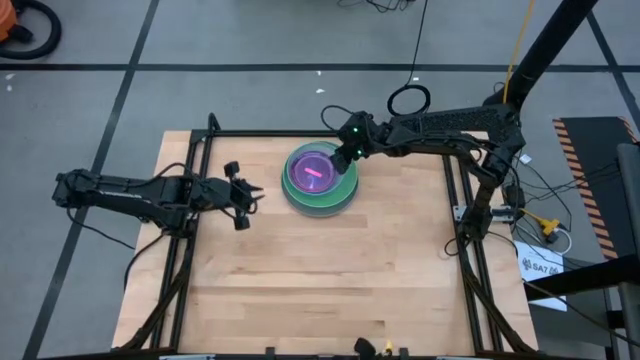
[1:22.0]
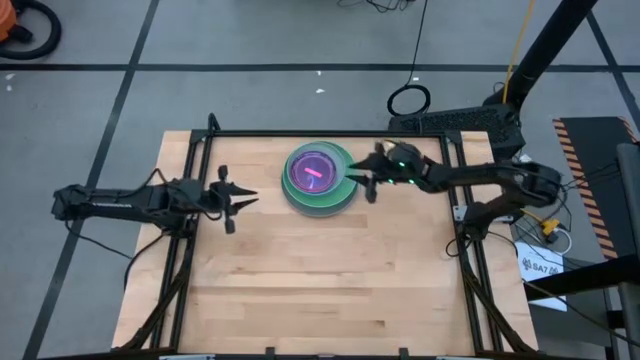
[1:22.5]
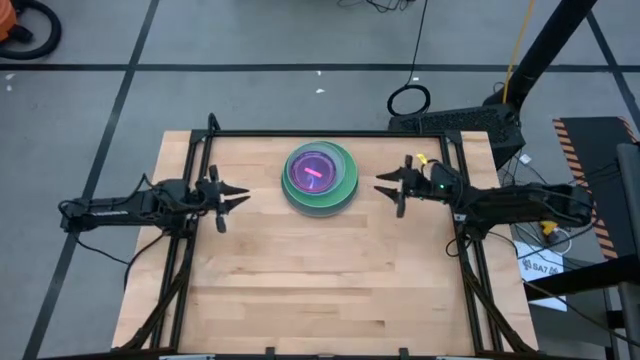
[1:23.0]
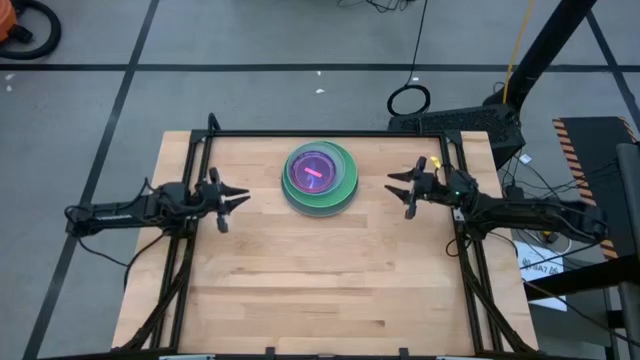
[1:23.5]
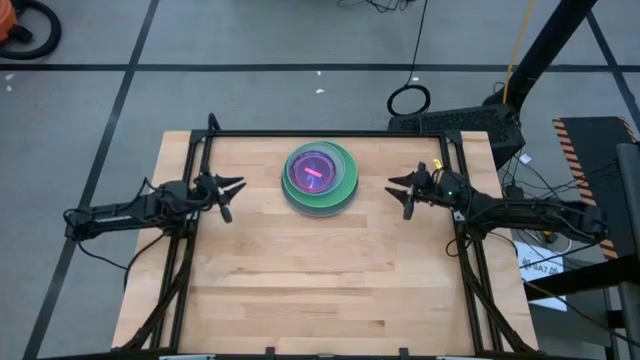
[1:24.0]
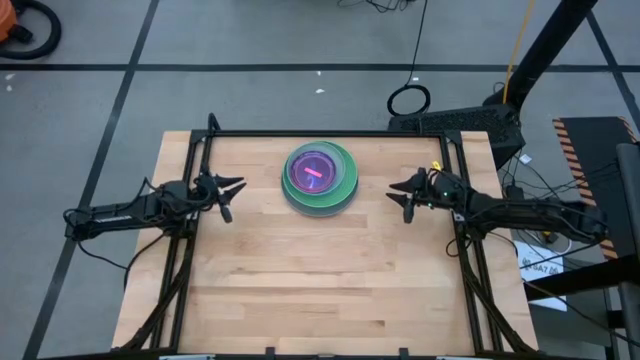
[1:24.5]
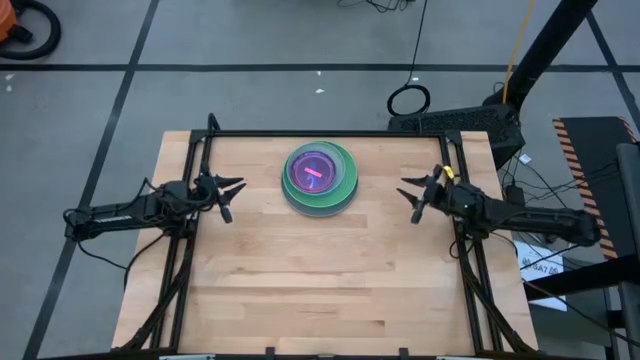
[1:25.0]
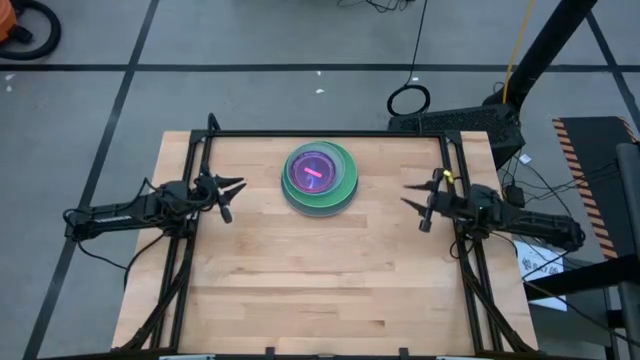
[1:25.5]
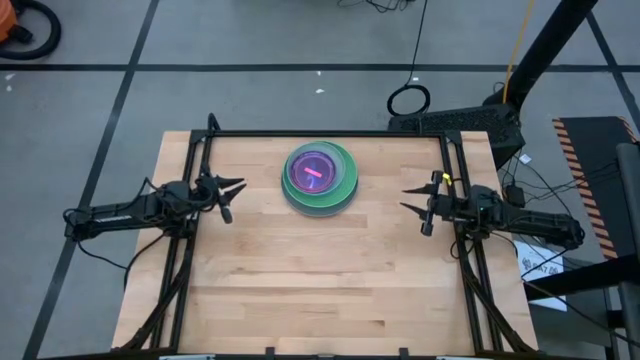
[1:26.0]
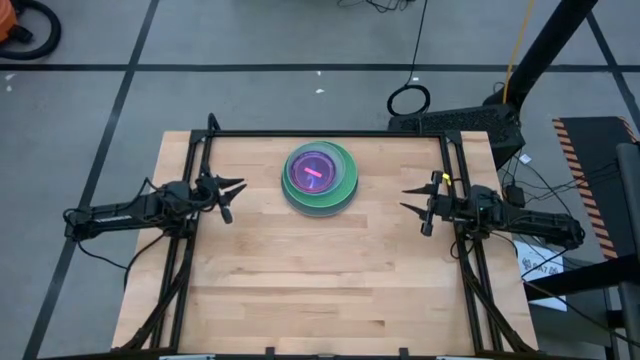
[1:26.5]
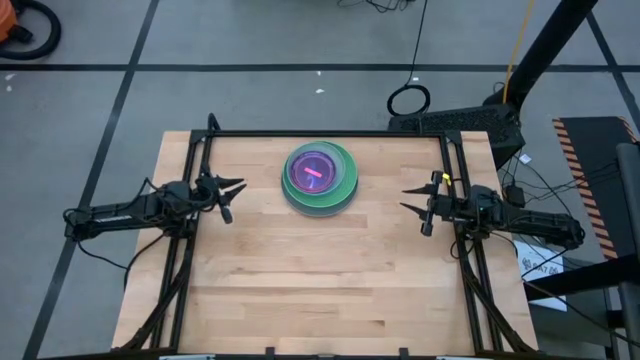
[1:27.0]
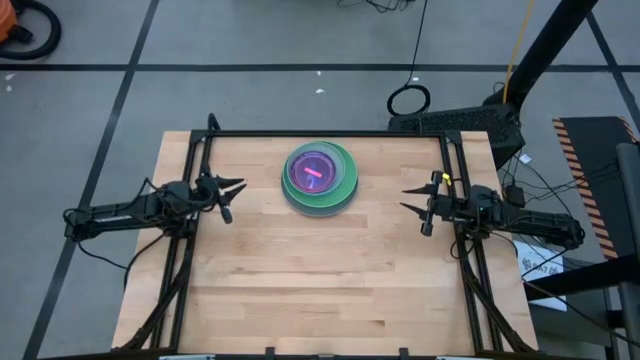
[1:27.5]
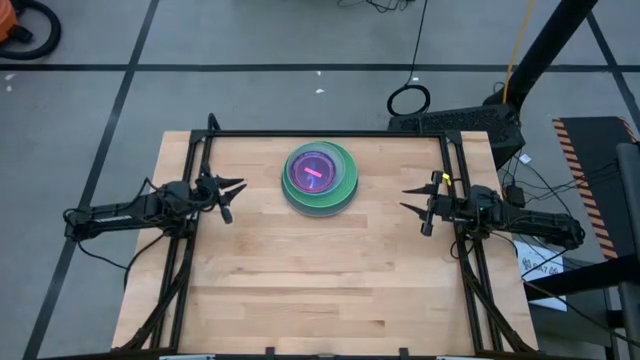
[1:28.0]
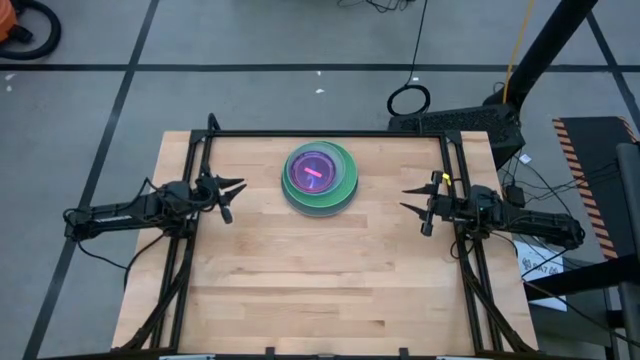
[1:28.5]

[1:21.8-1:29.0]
Task: Stack plastic plates
Return to Home Position

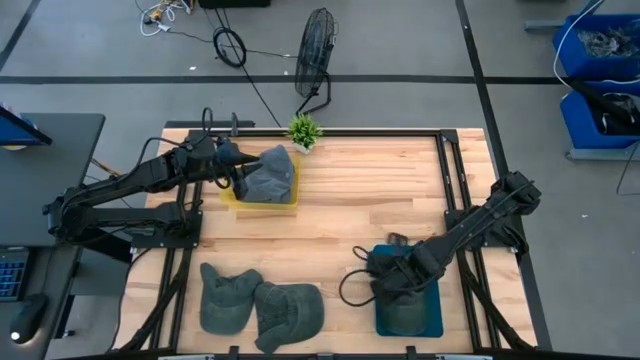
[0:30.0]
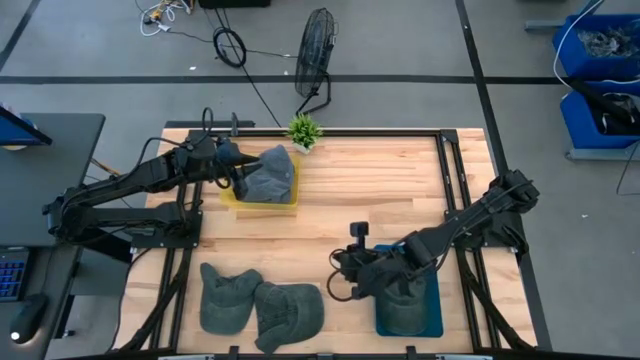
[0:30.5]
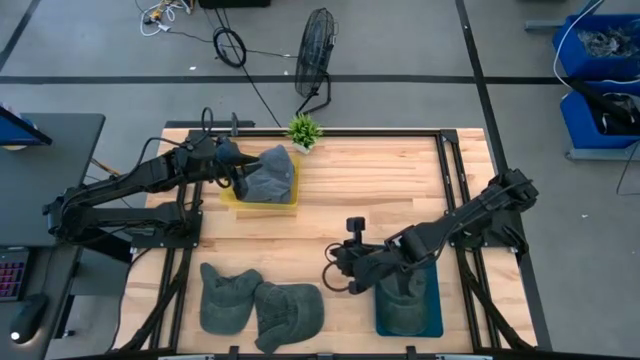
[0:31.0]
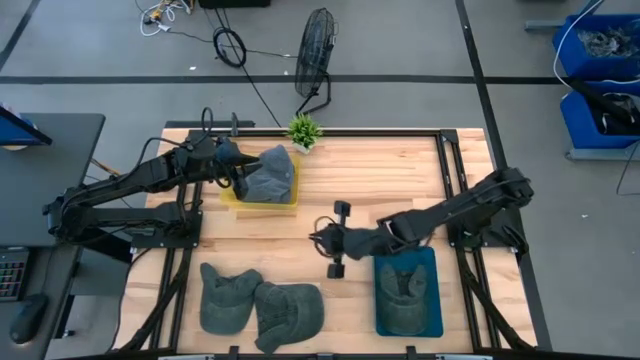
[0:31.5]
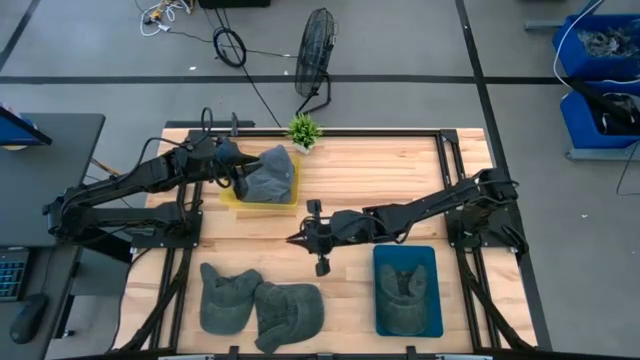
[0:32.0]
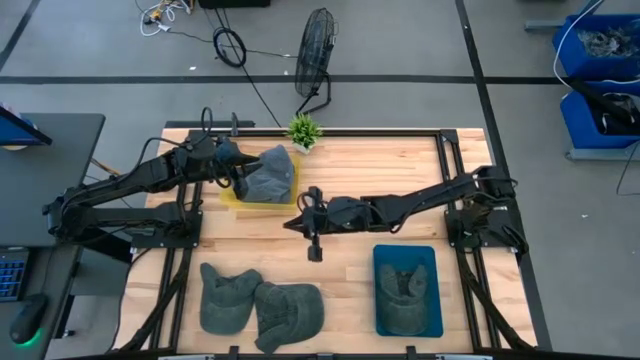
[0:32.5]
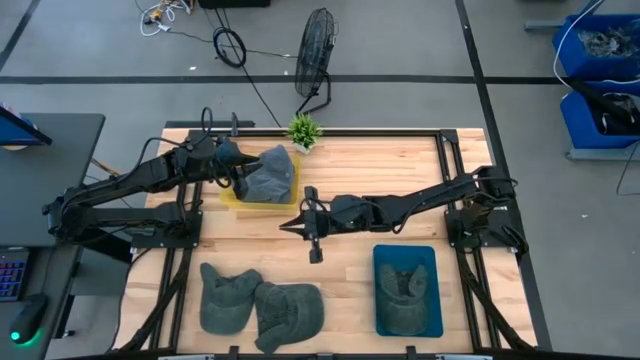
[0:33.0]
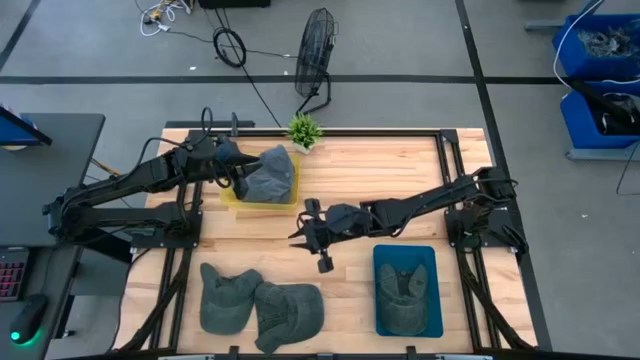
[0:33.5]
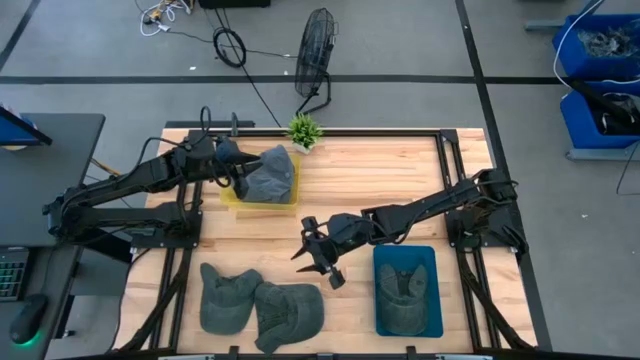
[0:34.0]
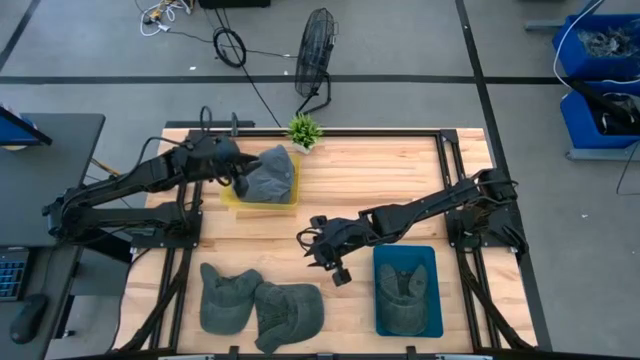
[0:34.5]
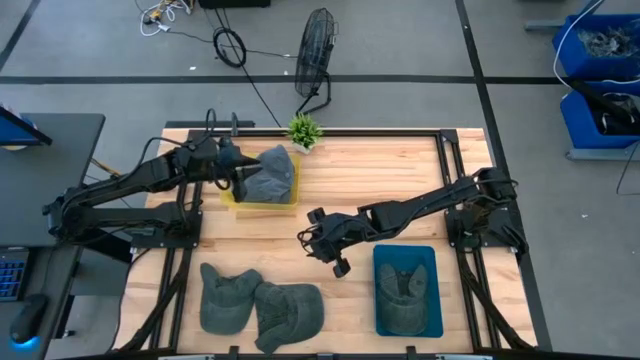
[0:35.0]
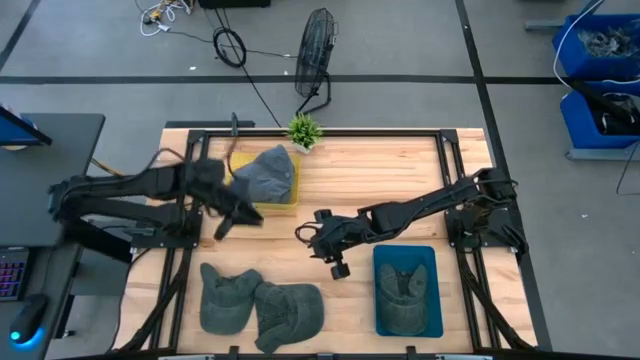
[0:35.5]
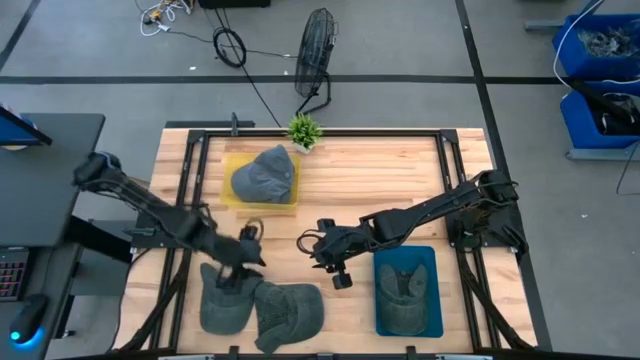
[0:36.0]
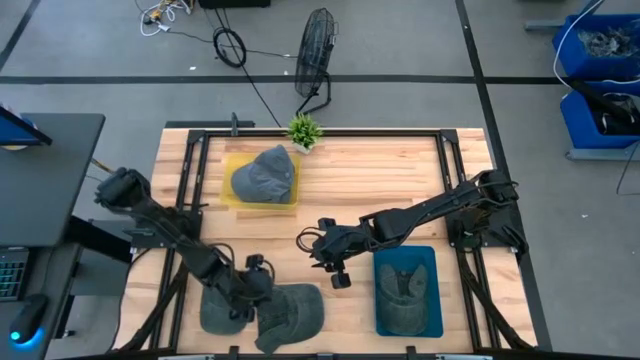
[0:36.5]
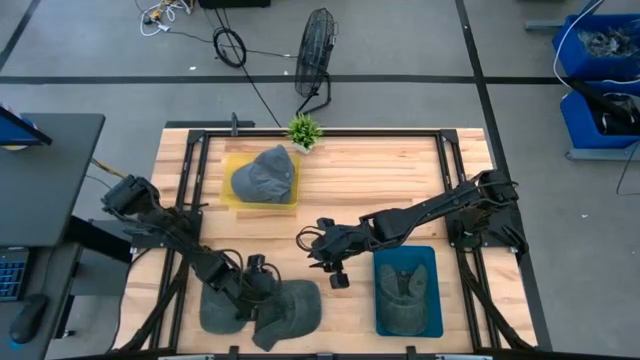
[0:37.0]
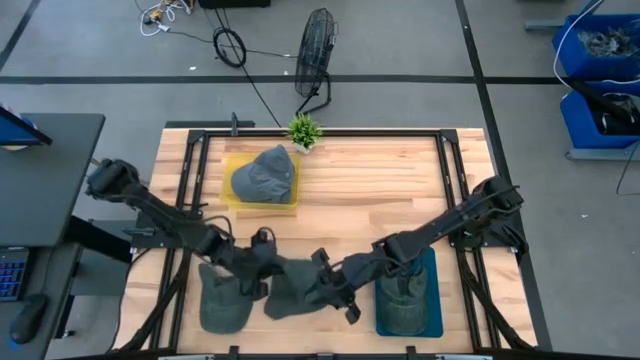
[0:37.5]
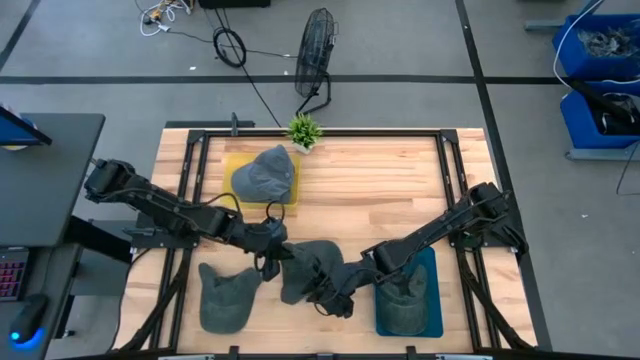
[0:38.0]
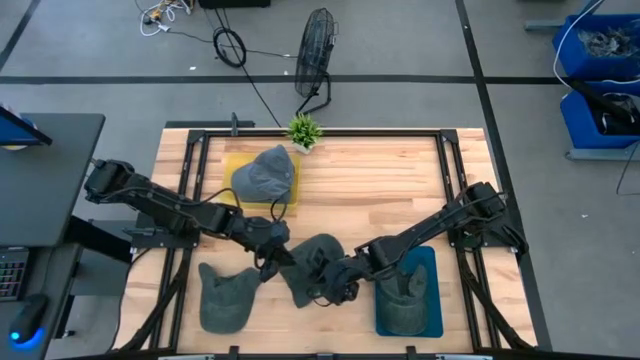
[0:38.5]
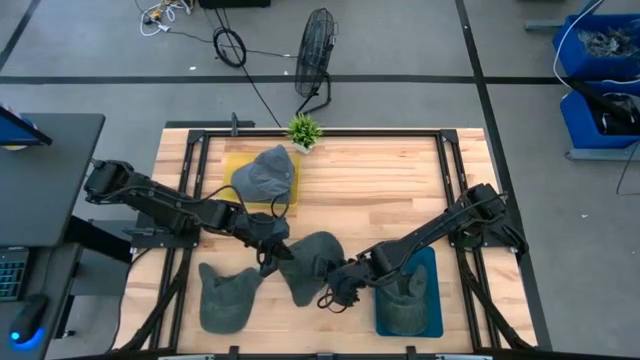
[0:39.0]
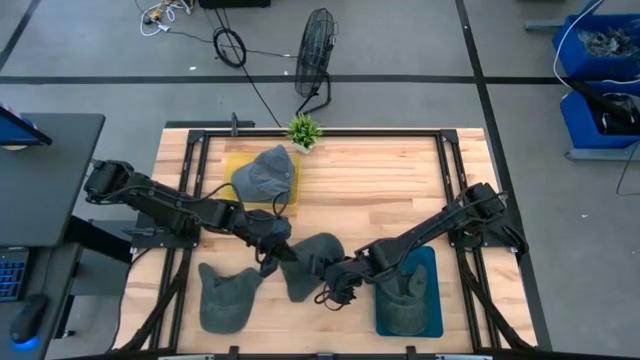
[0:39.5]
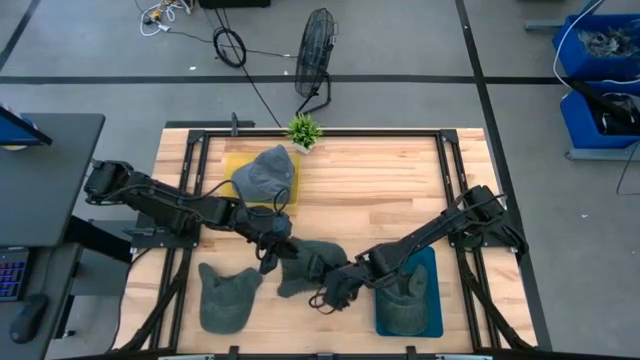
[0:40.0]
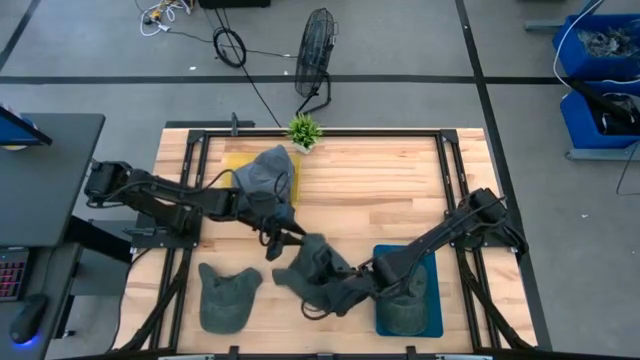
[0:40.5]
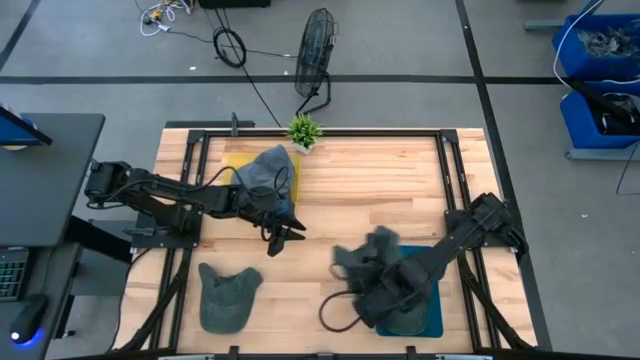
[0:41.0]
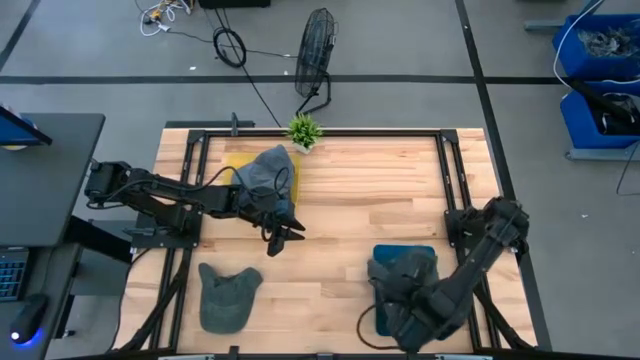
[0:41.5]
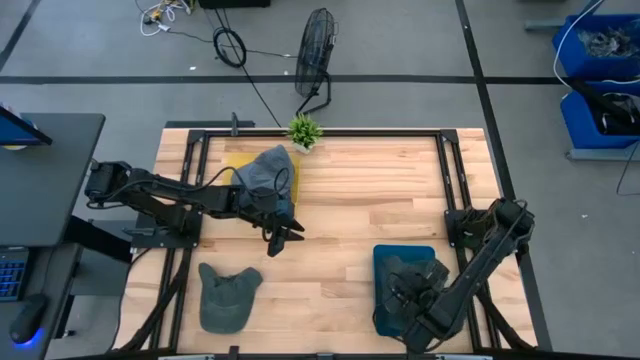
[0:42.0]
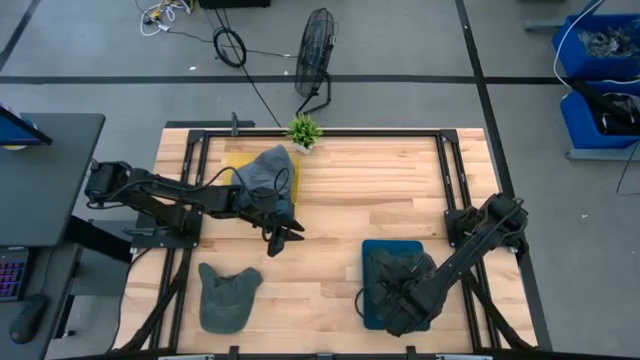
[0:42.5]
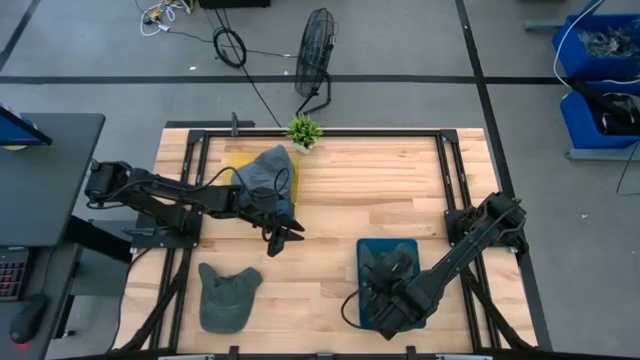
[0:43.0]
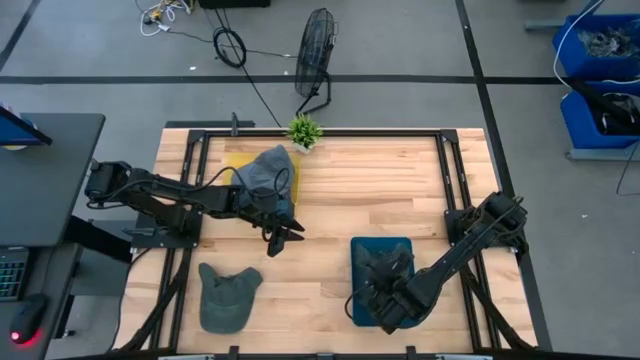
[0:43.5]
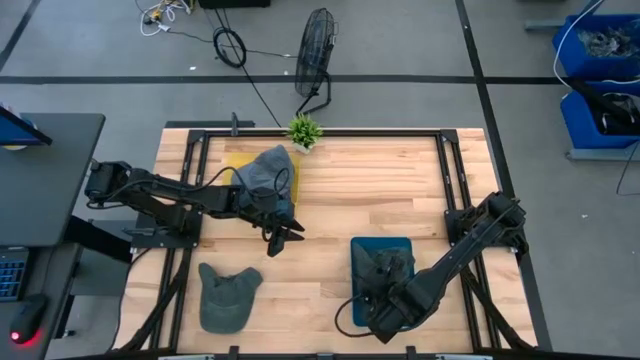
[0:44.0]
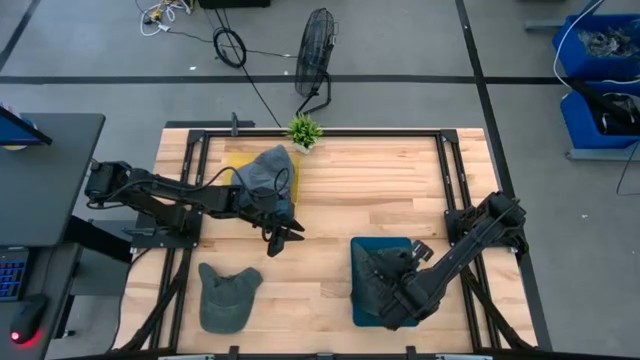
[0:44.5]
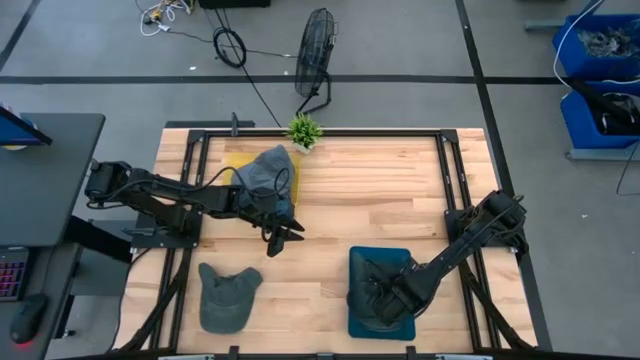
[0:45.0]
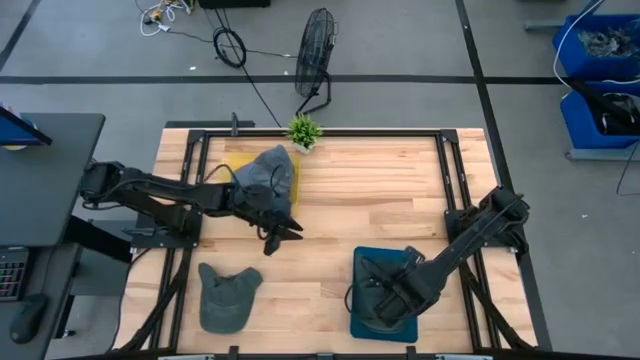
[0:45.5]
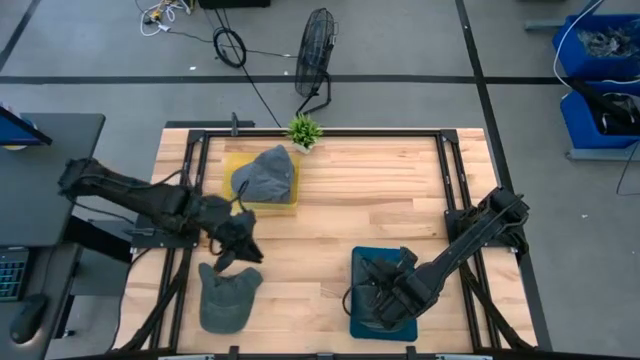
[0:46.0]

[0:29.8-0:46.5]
Task: Pick & Place hat
Put the right black cap into the blue bin
